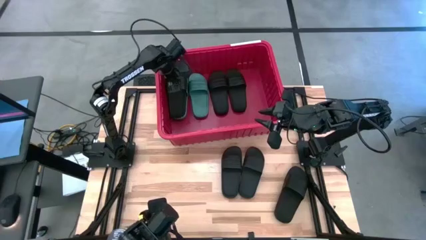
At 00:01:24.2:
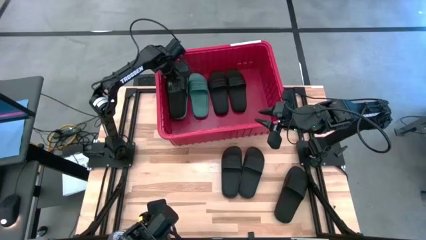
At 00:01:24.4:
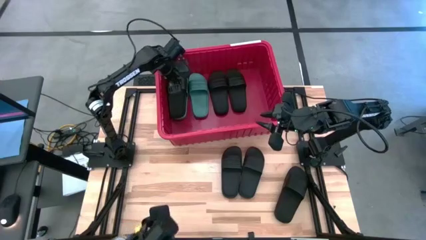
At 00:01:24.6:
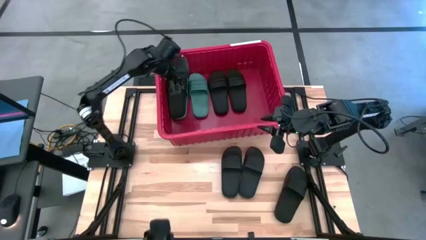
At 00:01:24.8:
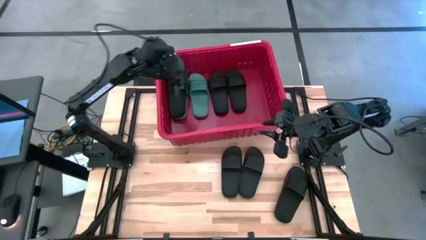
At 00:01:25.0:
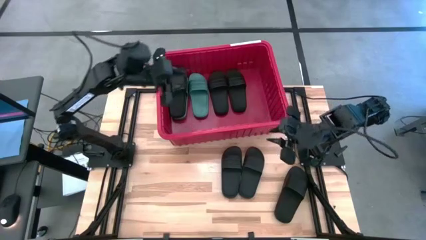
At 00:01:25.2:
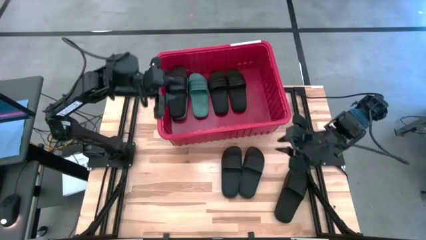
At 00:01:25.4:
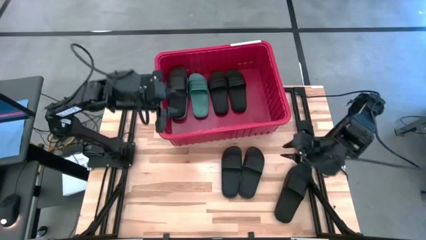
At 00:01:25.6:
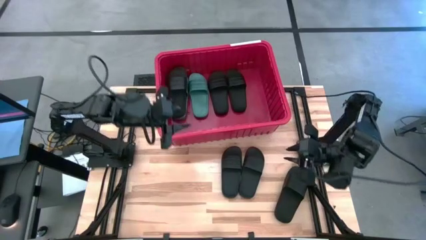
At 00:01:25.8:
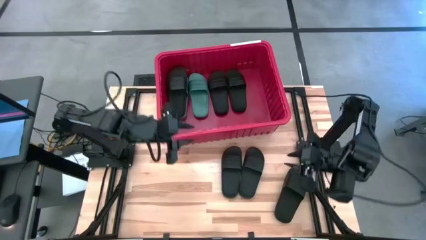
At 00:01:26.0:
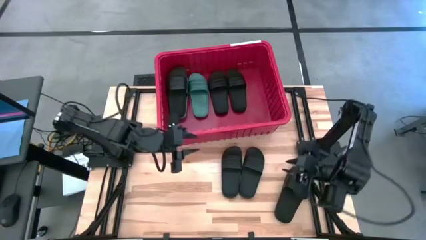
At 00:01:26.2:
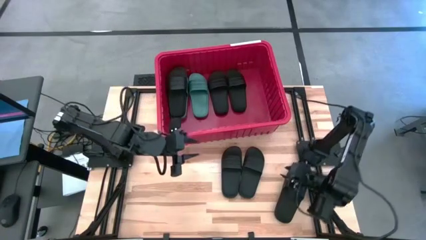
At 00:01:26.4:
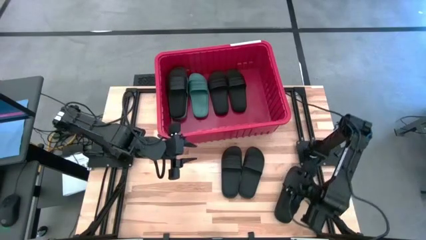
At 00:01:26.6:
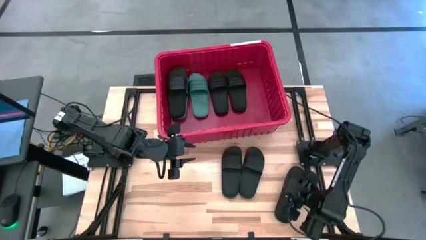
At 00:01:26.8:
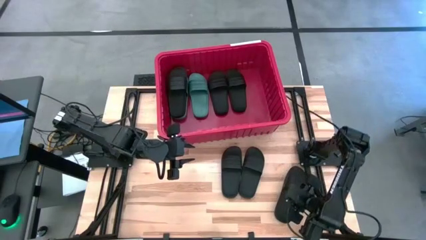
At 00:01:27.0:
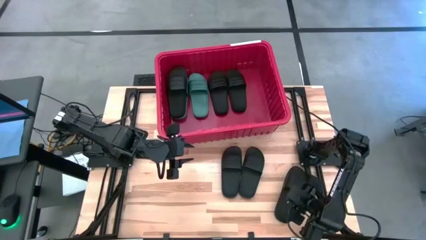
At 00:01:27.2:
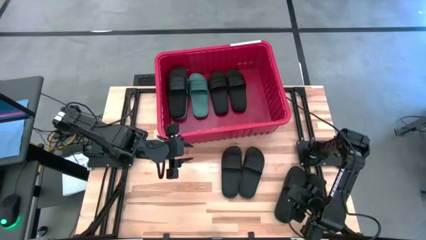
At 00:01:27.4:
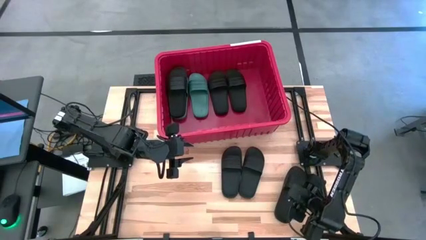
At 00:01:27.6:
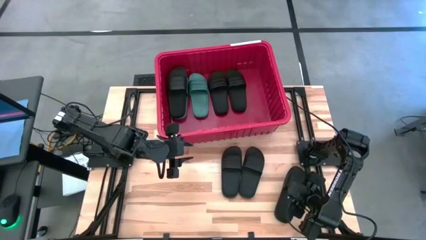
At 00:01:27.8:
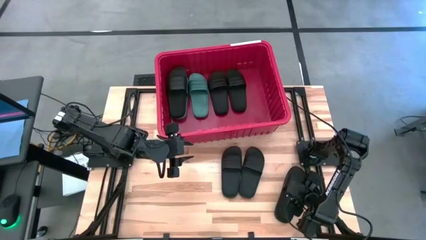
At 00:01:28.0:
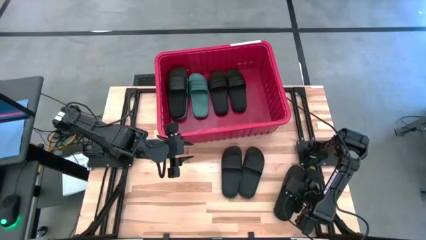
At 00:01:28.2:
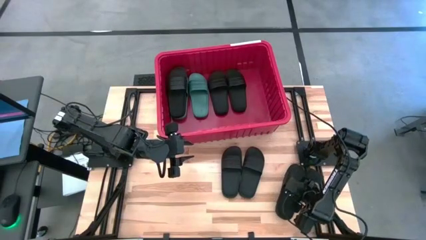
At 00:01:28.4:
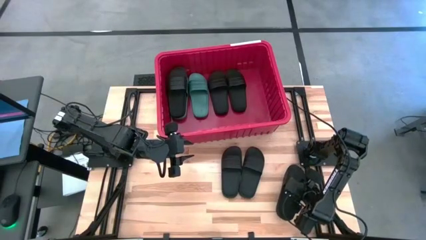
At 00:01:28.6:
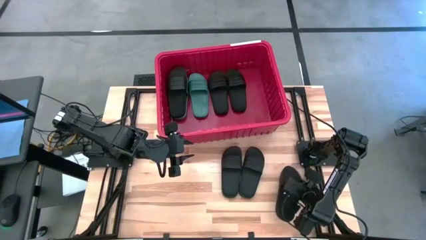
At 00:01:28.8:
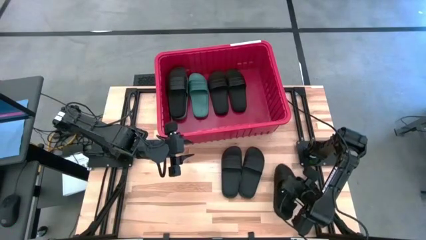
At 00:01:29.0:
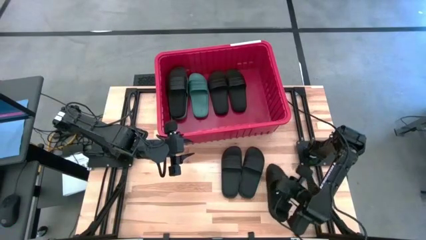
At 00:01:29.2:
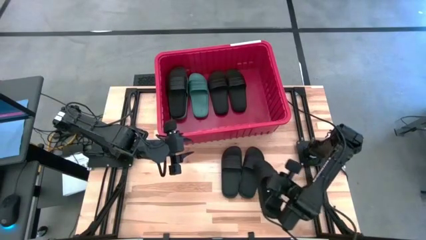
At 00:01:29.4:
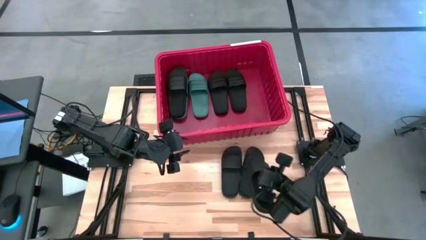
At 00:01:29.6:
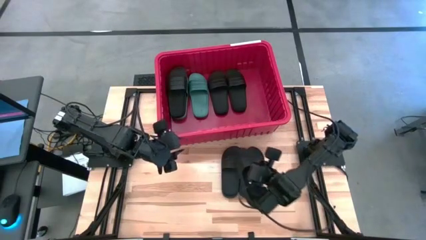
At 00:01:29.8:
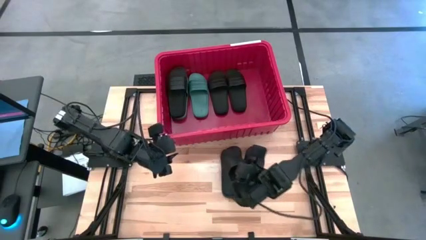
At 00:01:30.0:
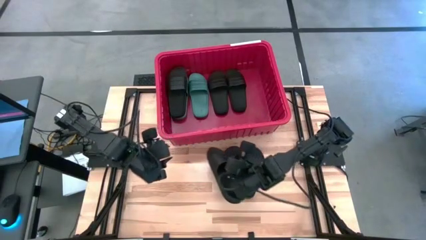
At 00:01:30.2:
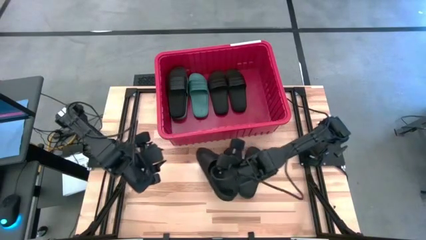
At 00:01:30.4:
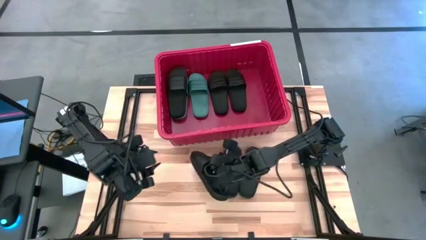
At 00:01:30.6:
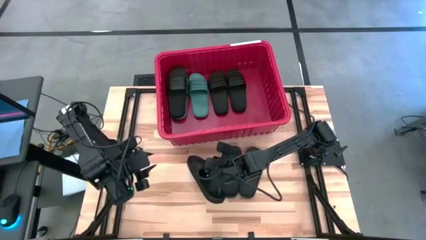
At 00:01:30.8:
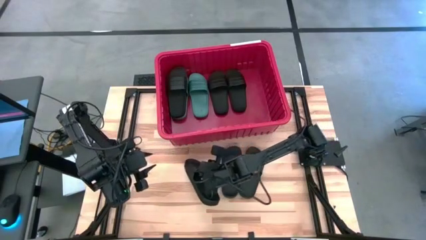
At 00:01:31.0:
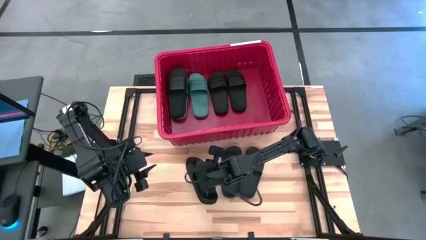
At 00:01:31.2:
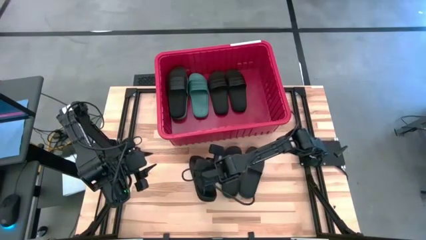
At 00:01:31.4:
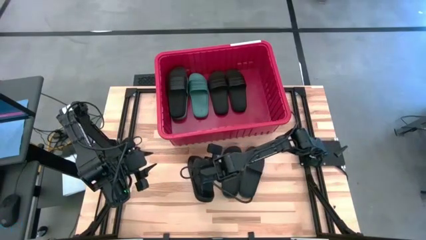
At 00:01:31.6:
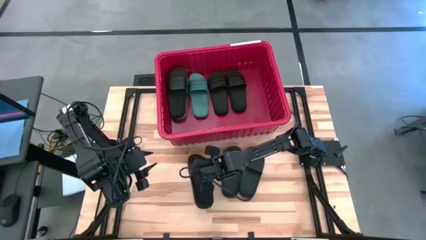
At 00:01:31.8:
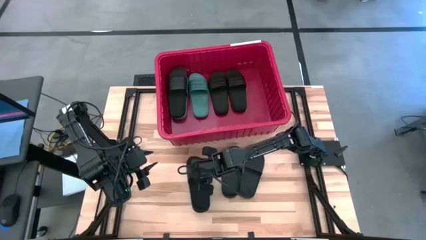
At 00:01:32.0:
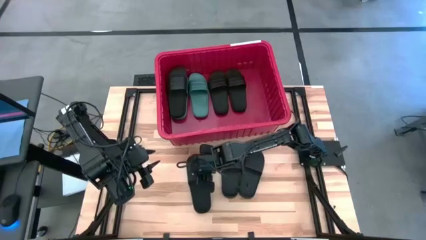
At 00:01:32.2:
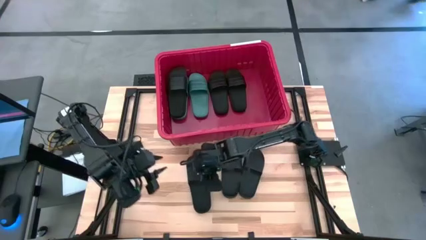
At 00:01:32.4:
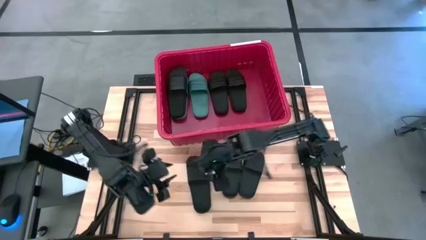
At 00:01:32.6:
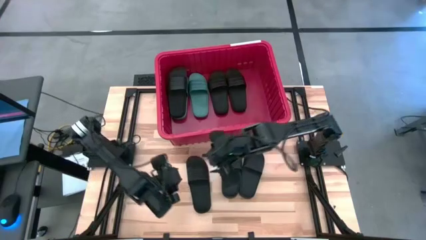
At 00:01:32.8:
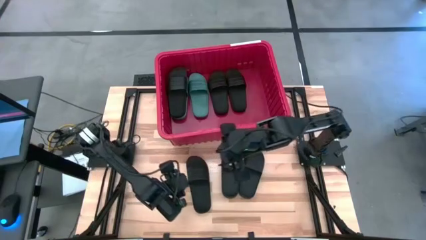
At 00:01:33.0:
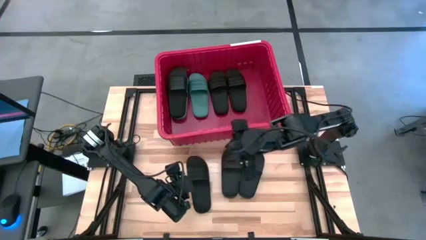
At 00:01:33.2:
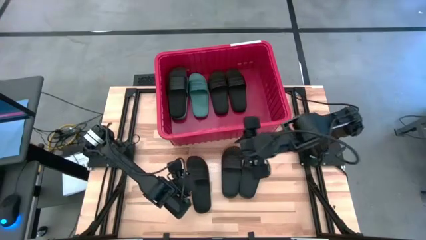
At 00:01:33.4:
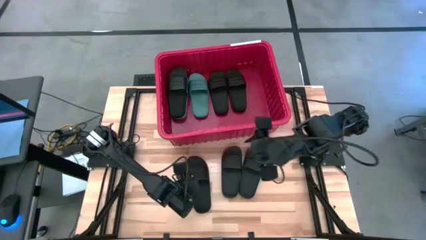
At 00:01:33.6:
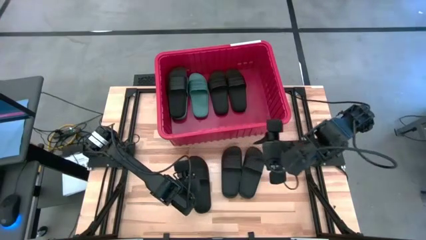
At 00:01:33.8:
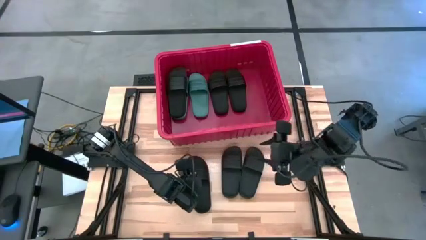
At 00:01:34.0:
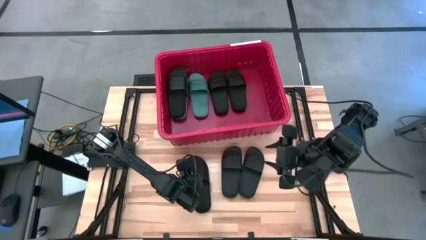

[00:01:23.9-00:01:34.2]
Task: Pick and place slides into bin
Put the black slipper into the red container
